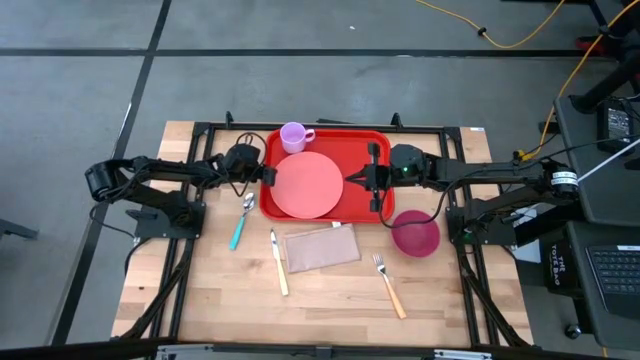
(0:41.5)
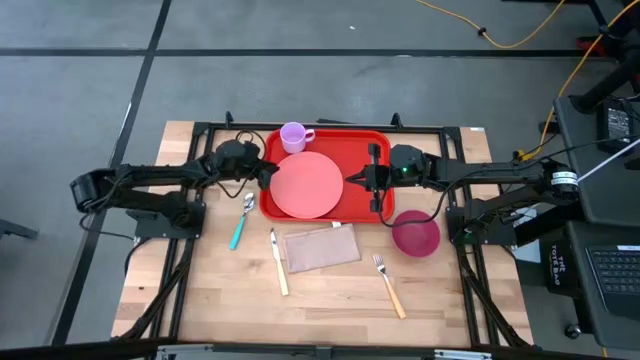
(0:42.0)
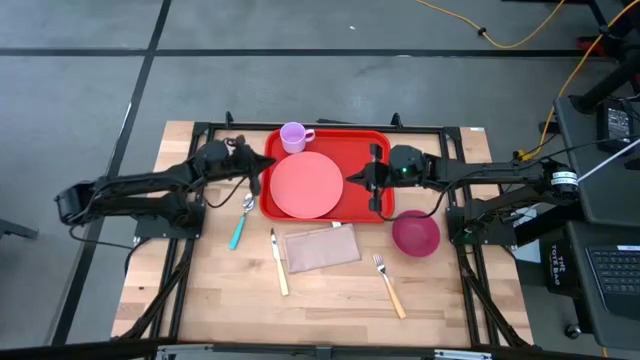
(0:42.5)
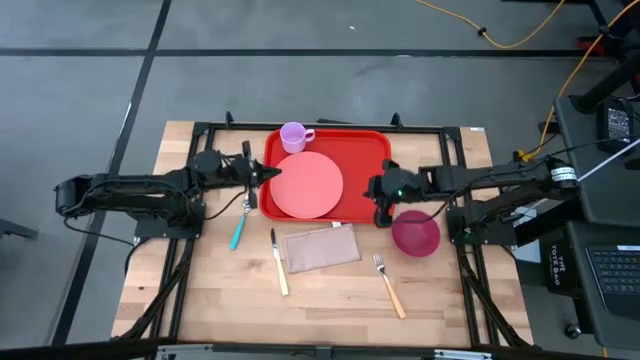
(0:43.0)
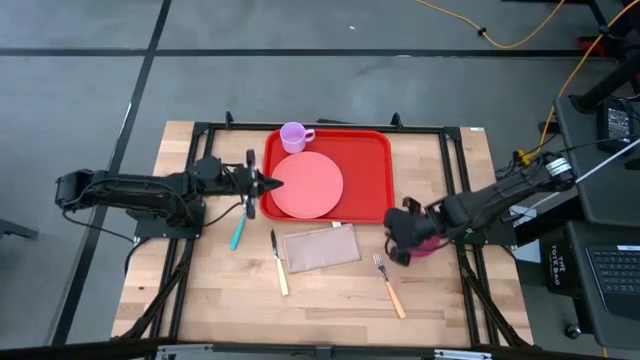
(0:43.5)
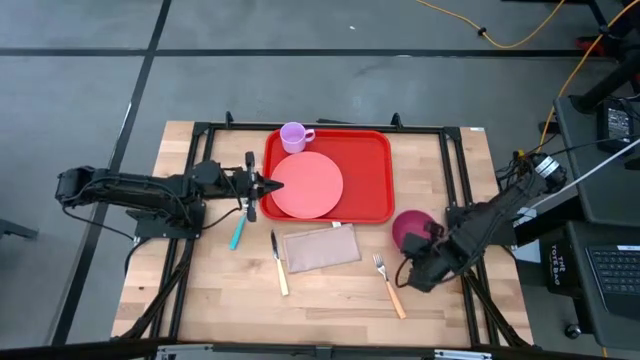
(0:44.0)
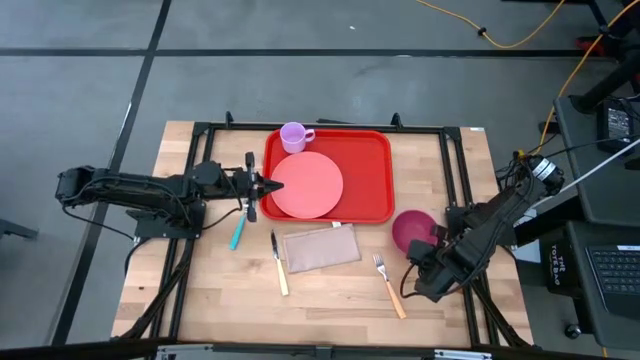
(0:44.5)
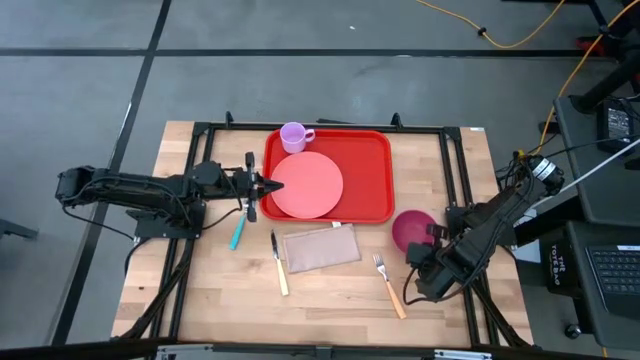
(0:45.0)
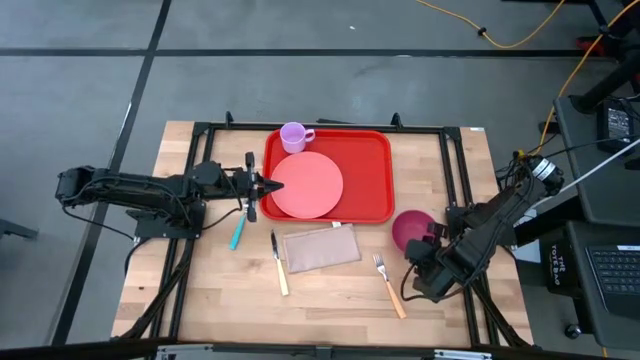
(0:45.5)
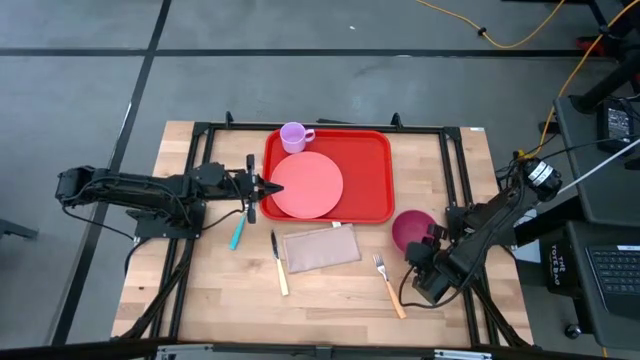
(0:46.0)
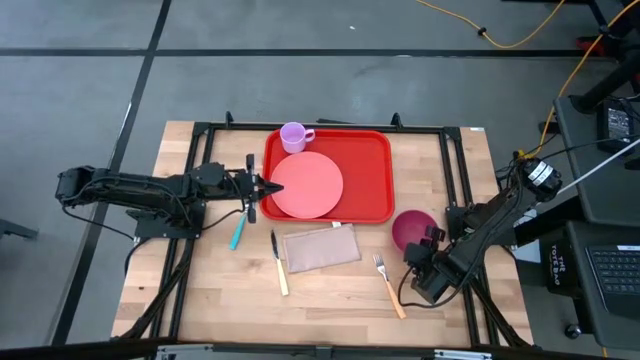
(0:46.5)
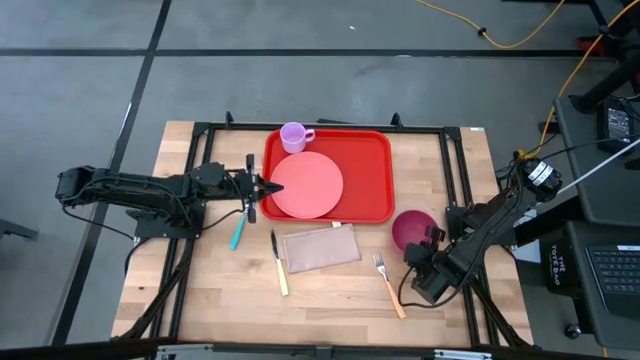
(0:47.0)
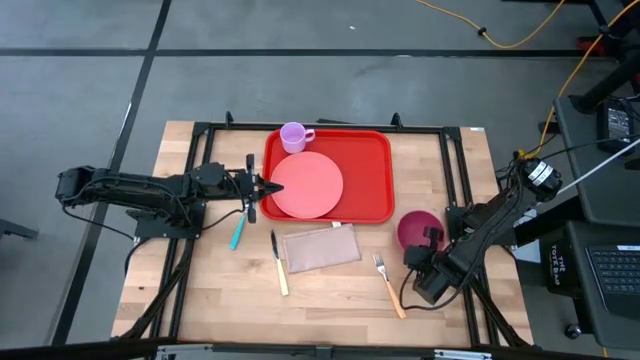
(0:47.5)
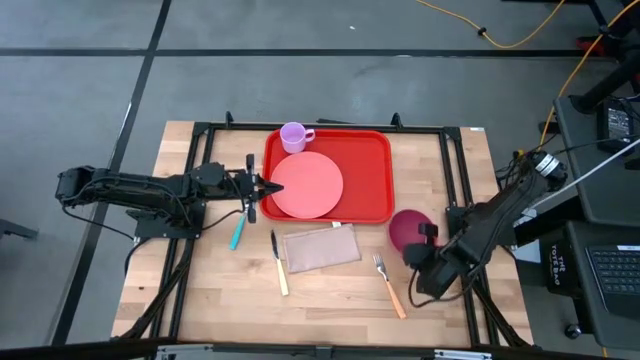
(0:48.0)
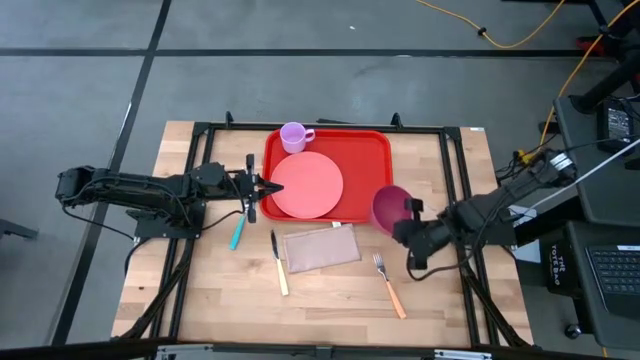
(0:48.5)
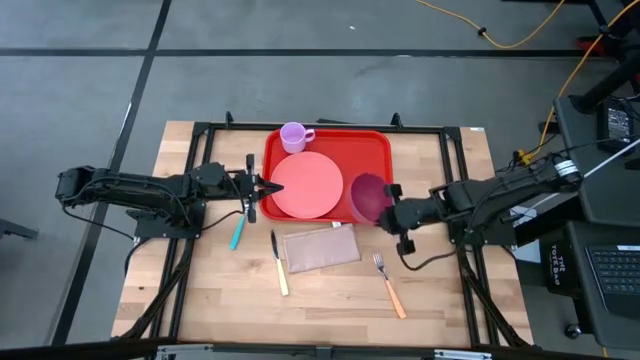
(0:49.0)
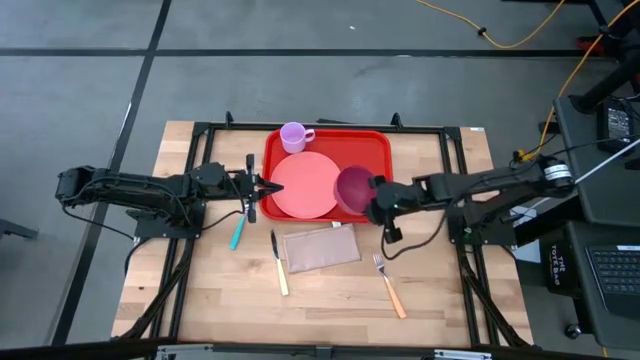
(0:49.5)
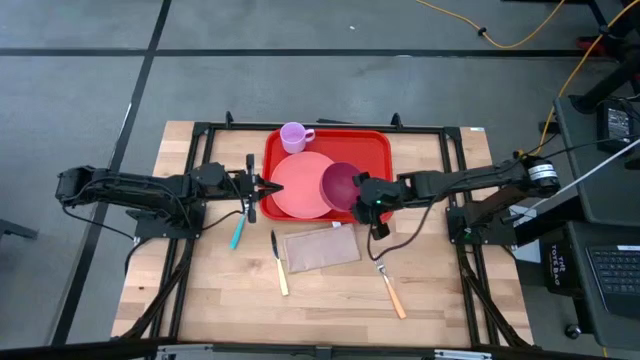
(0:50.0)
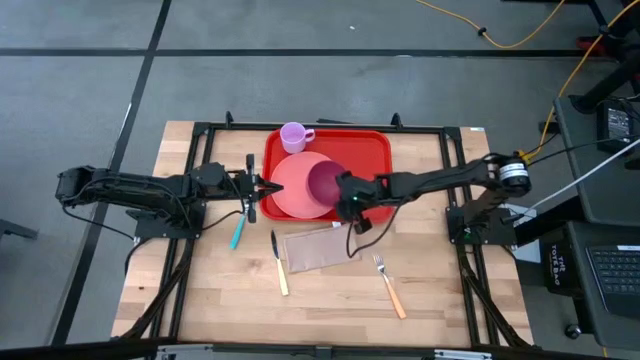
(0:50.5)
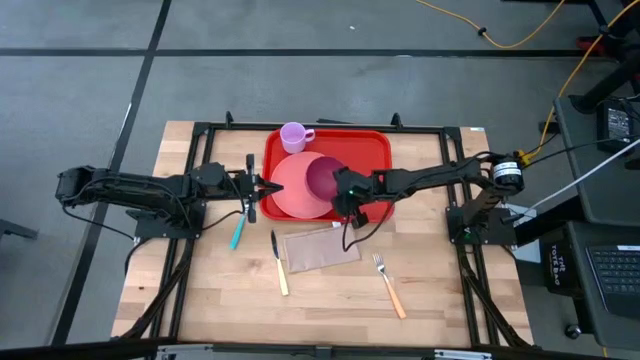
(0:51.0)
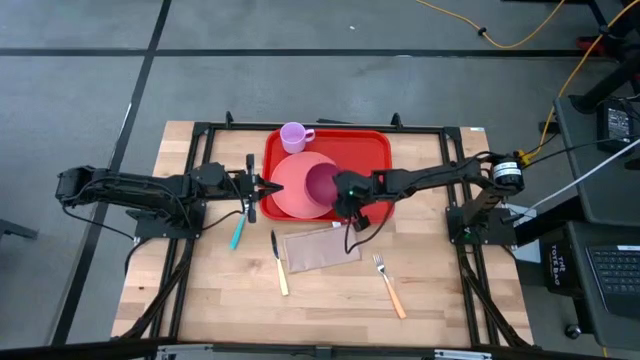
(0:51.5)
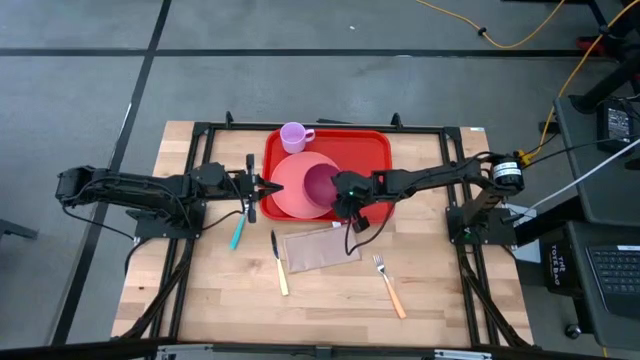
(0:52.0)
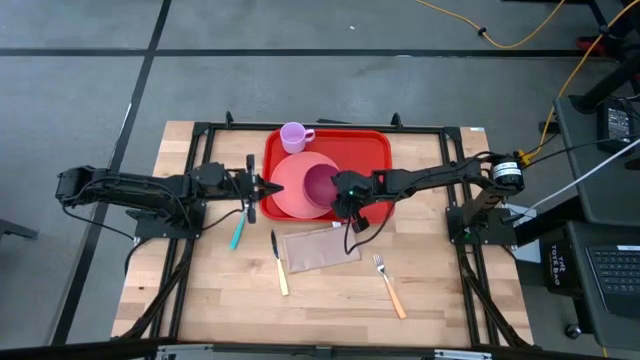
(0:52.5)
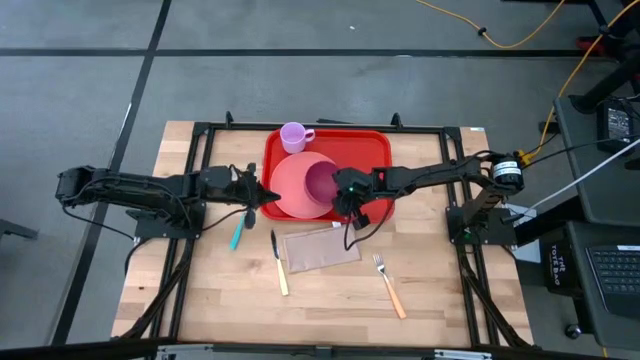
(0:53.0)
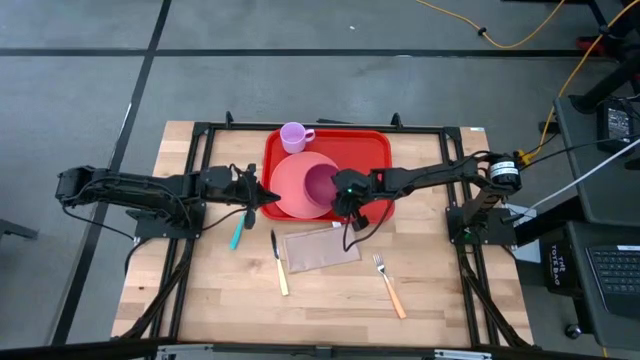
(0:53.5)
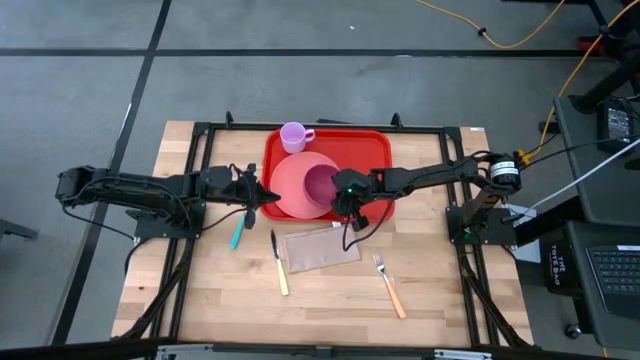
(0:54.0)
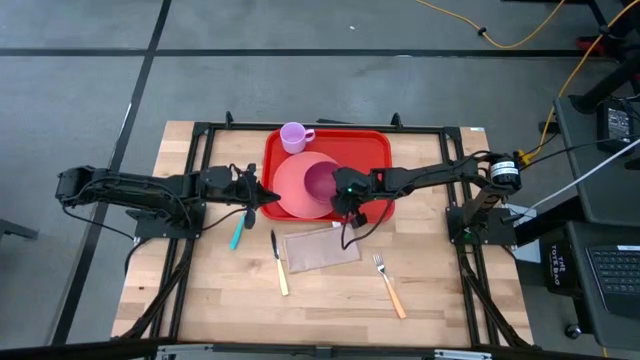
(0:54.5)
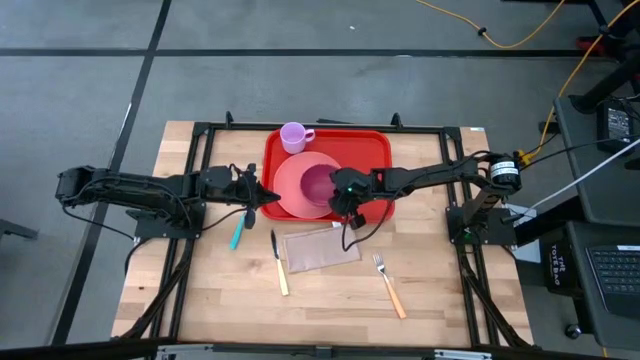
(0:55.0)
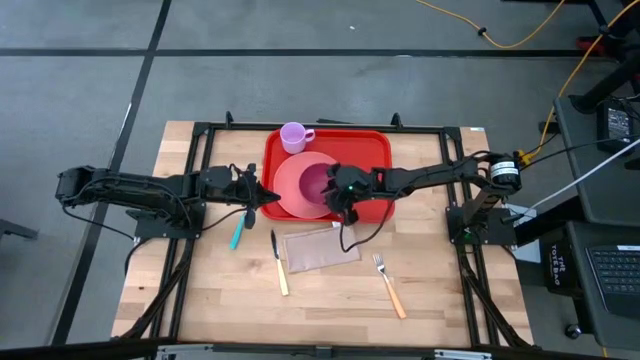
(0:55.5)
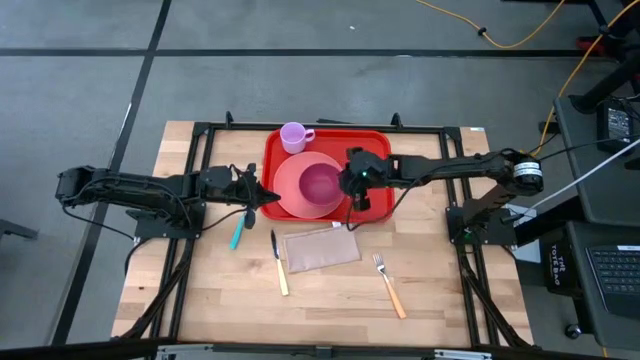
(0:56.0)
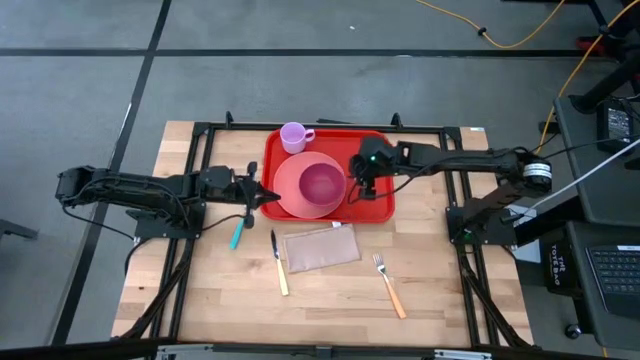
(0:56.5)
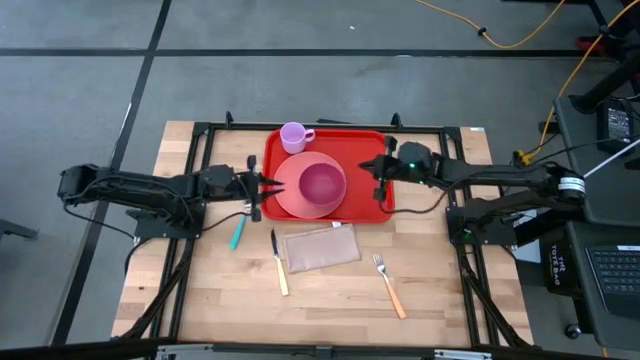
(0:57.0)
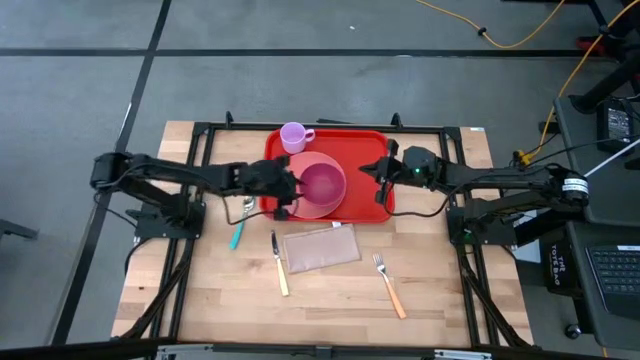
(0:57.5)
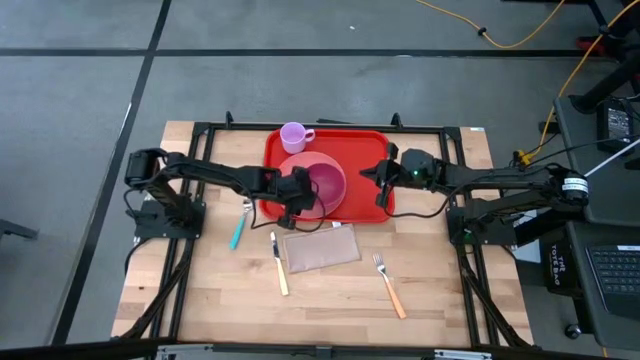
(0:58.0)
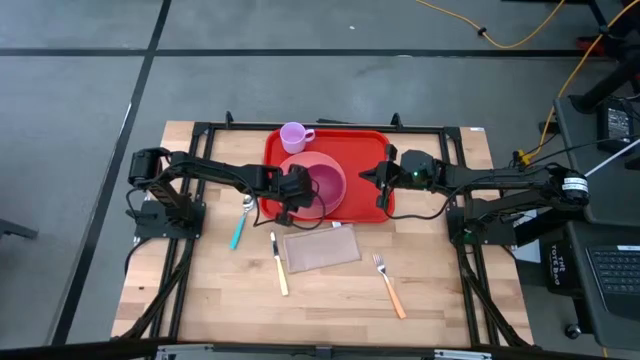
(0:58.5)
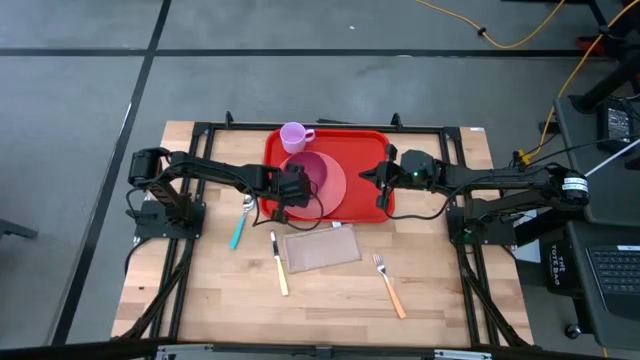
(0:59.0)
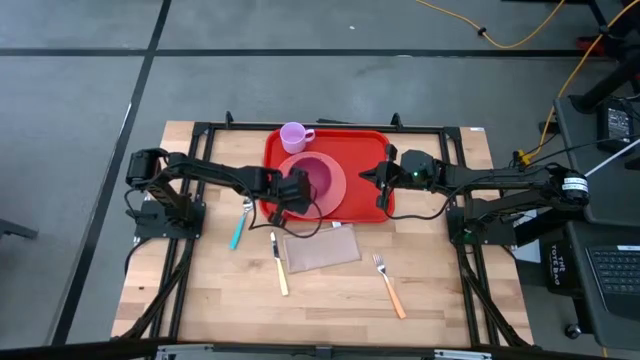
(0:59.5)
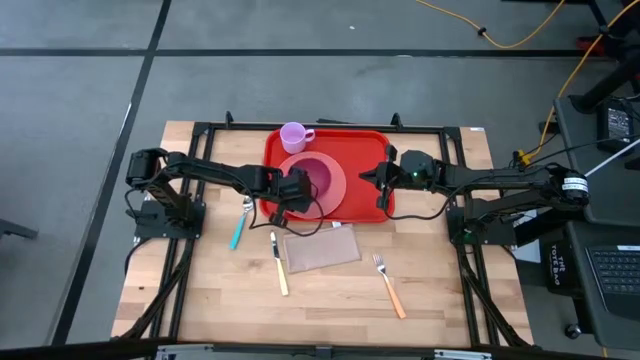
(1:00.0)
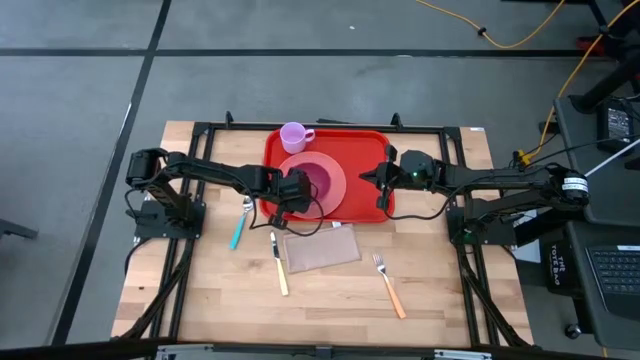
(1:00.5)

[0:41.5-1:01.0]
Task: Set up tray
Put the dark pink bowl on top of the pink plate

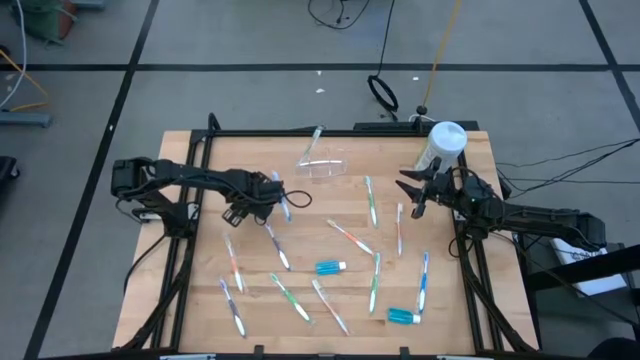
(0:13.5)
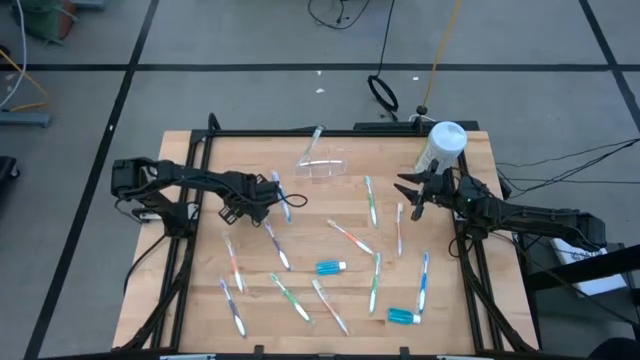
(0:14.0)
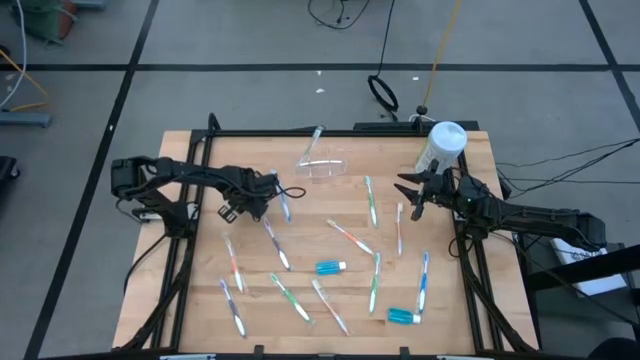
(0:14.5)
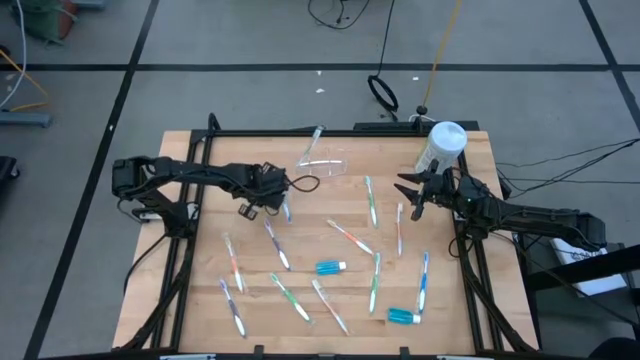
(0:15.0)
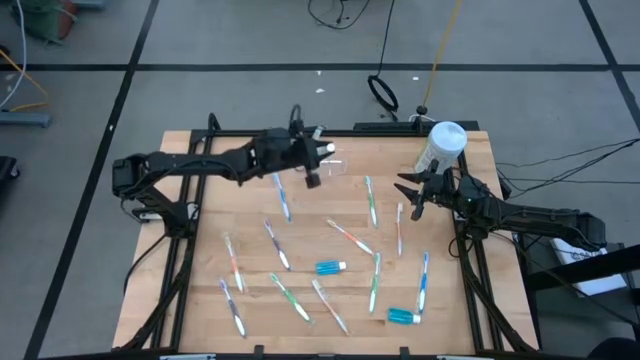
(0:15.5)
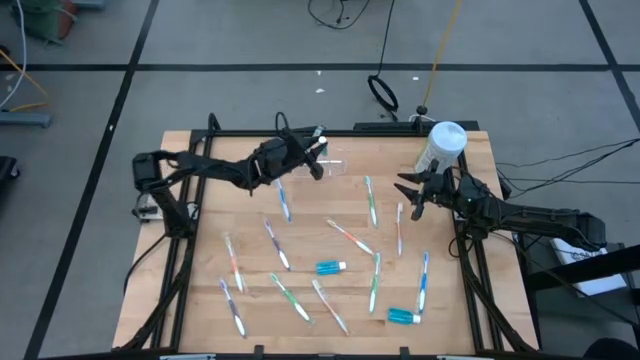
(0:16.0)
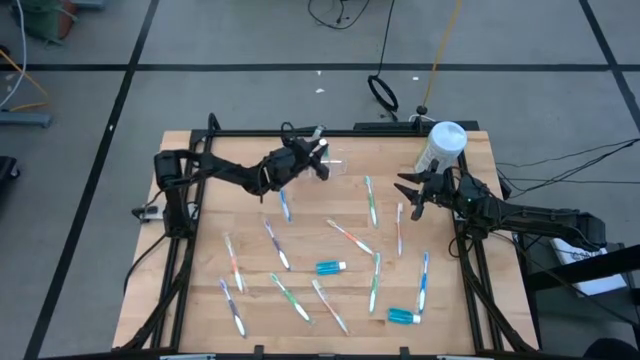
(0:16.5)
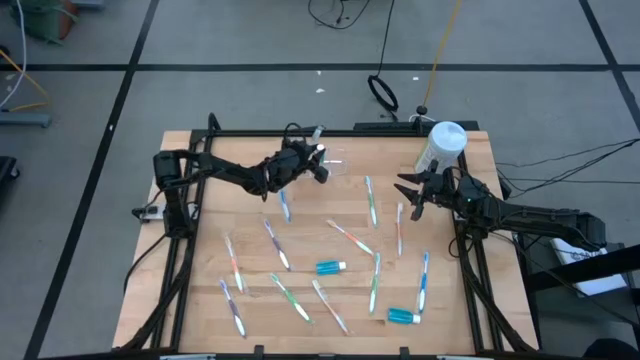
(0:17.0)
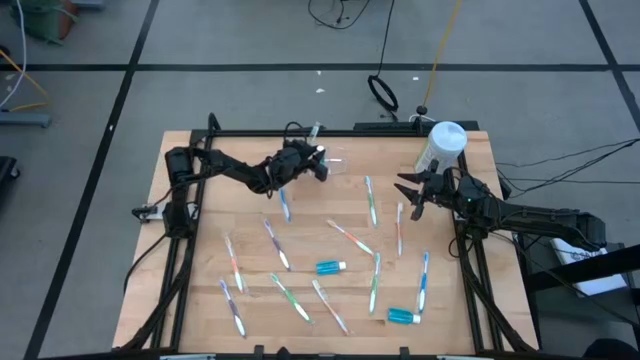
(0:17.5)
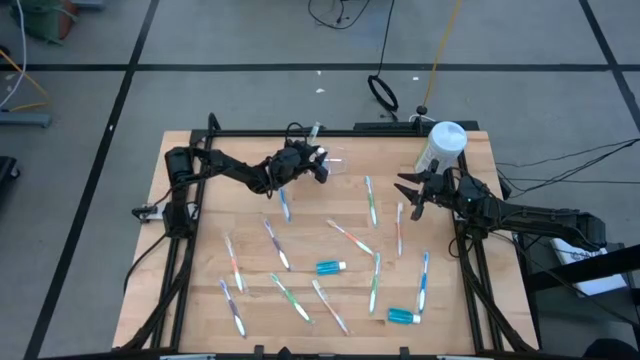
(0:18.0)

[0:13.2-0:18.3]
Task: Pick & Place Toothbrushes
Put the mouthwash into the transparent organizer
